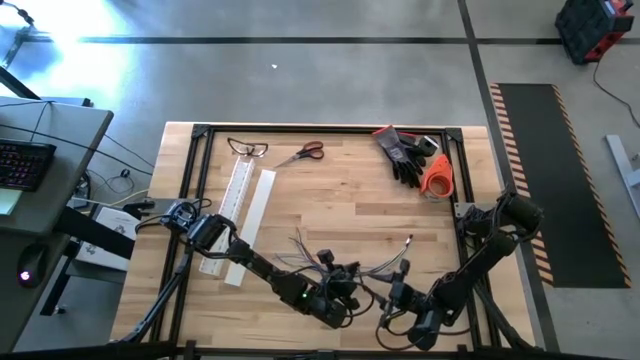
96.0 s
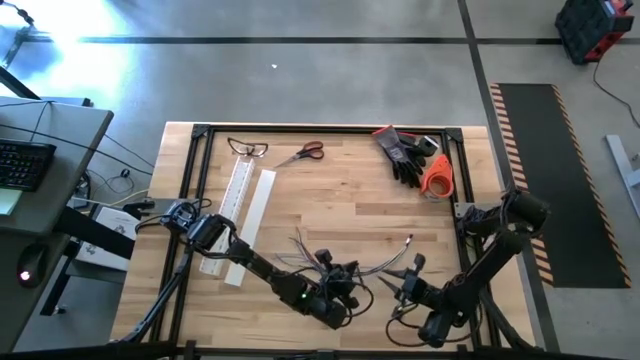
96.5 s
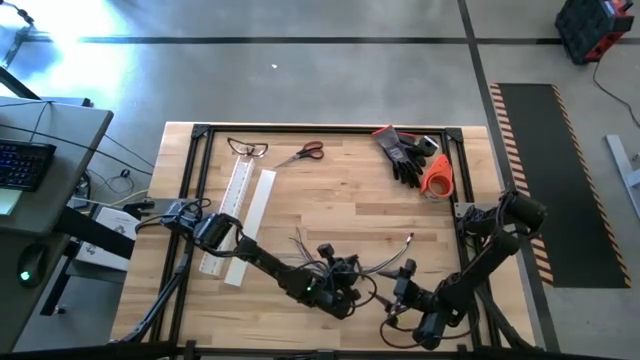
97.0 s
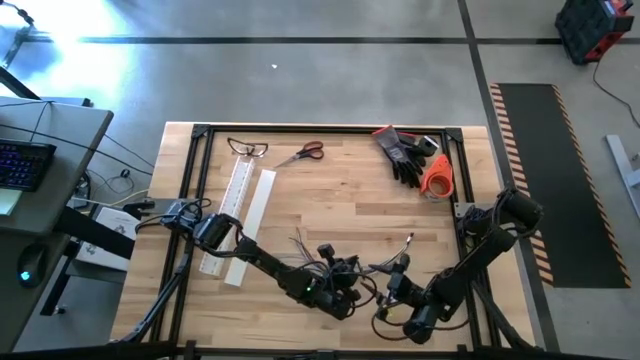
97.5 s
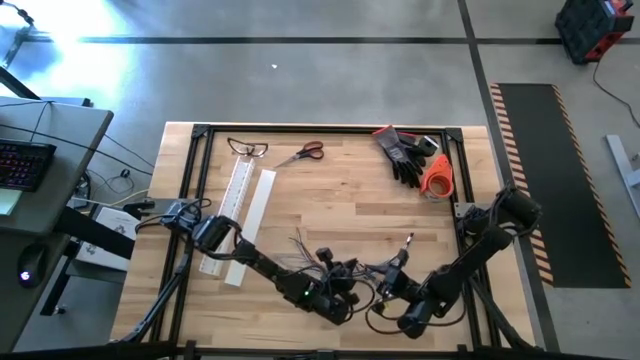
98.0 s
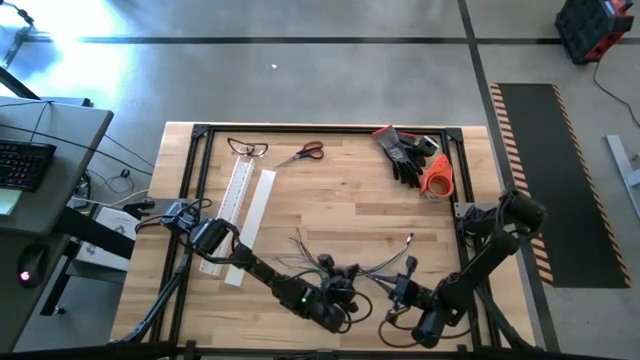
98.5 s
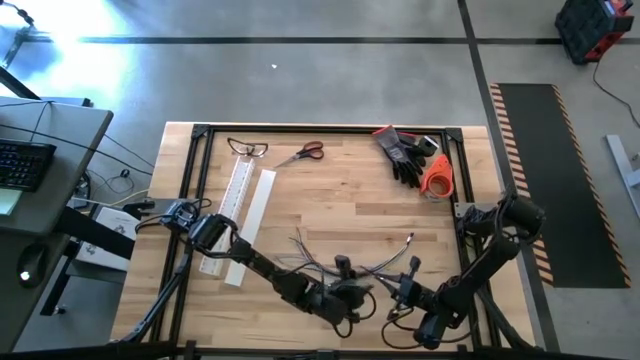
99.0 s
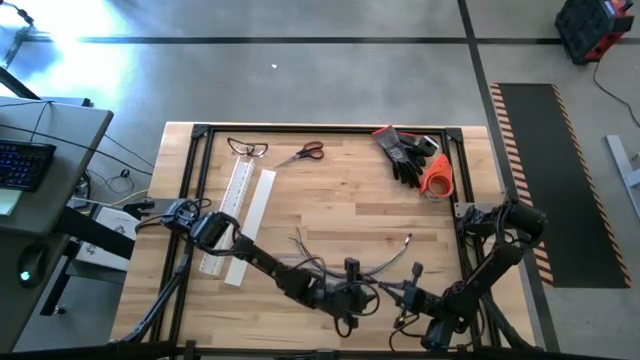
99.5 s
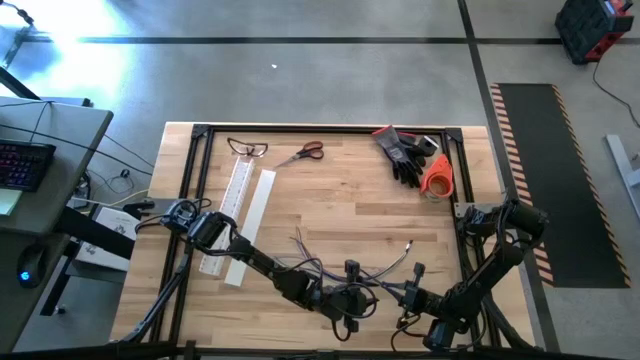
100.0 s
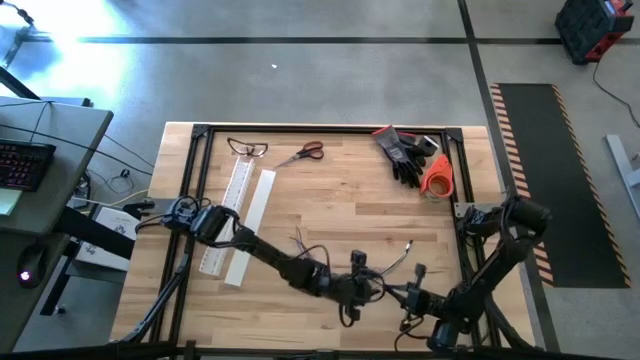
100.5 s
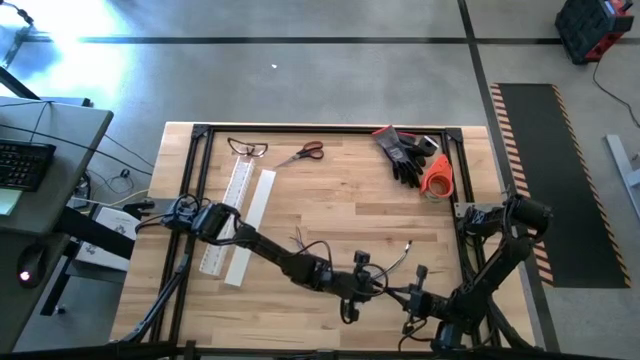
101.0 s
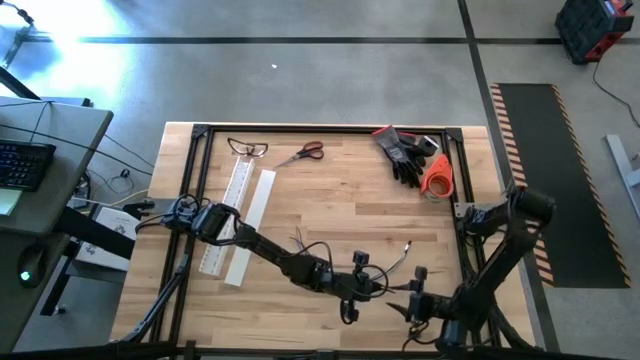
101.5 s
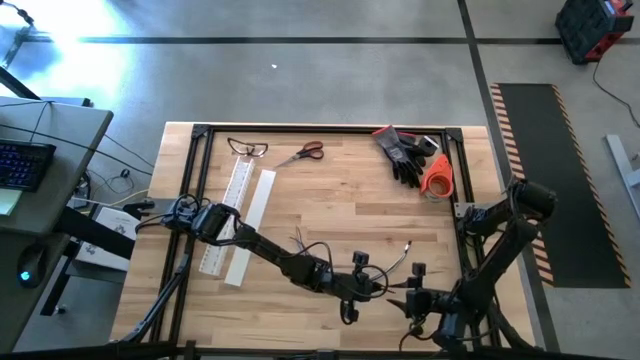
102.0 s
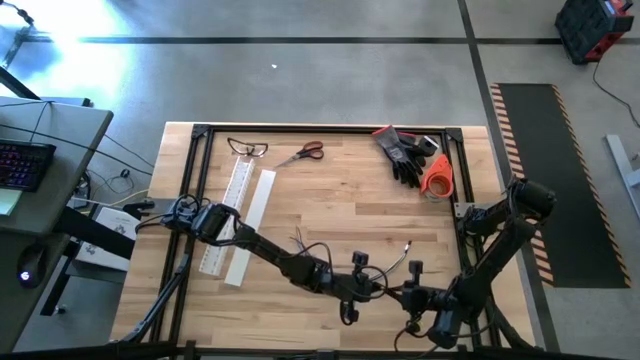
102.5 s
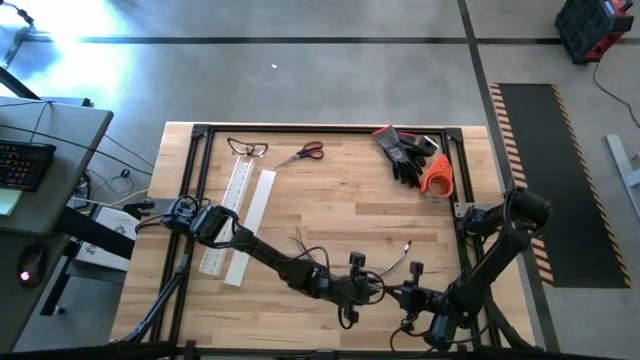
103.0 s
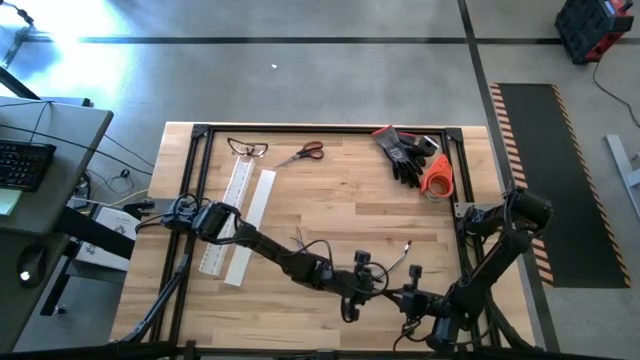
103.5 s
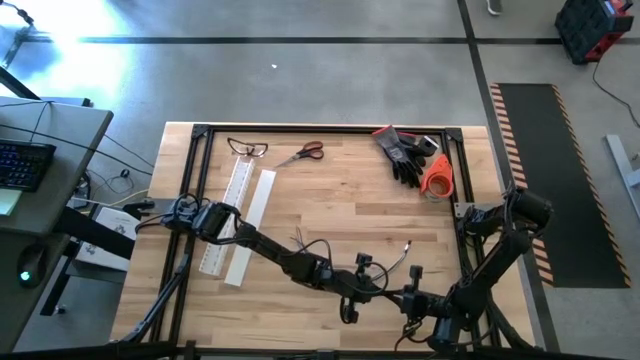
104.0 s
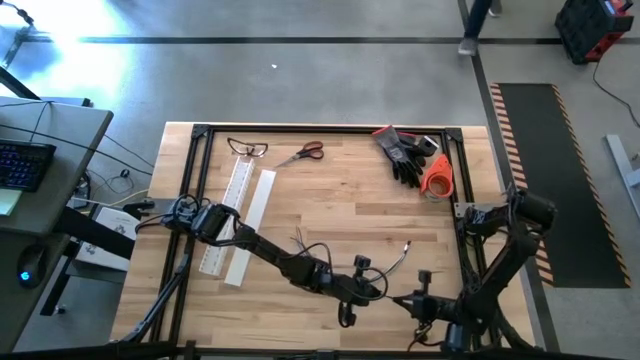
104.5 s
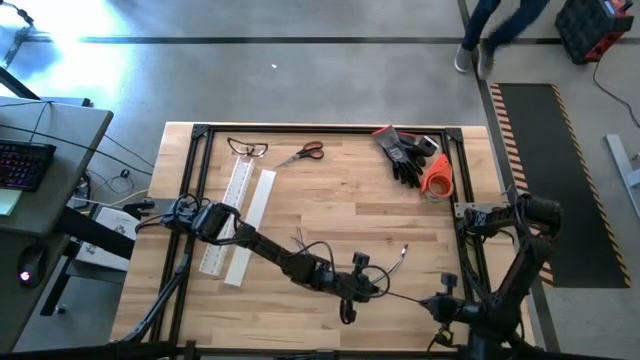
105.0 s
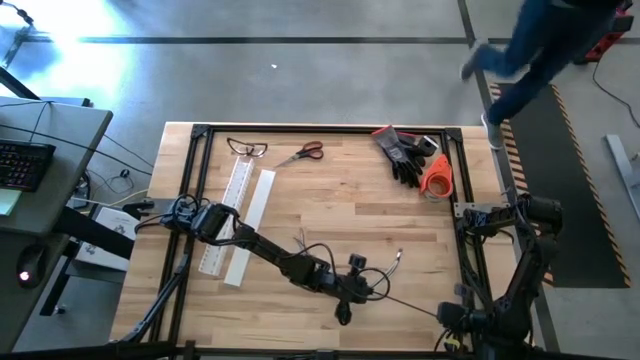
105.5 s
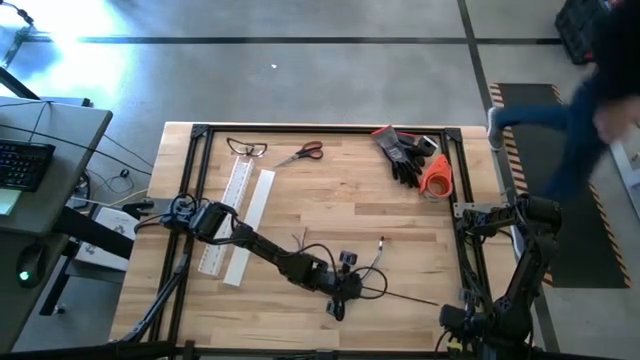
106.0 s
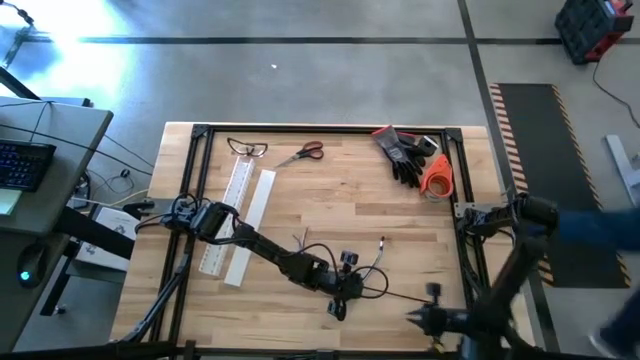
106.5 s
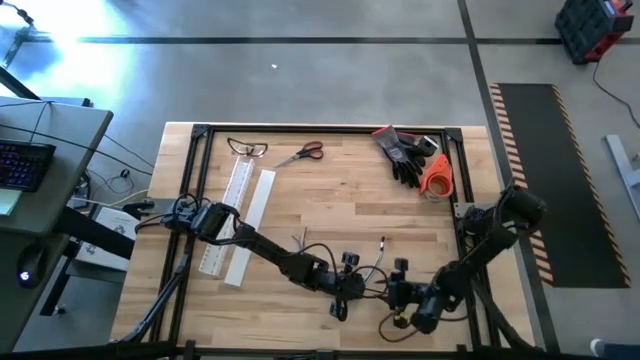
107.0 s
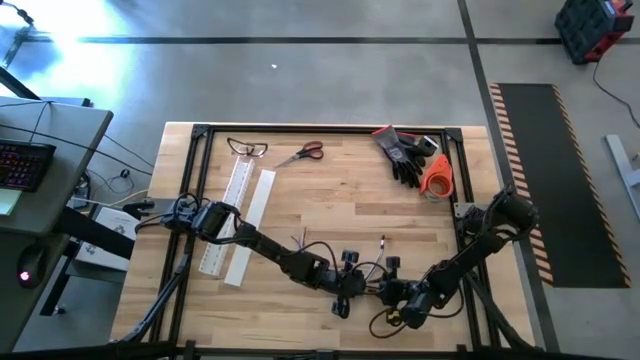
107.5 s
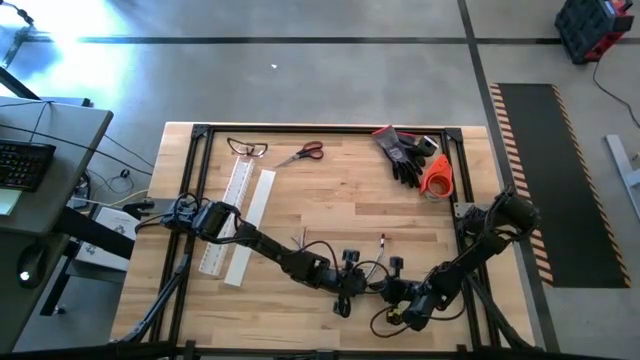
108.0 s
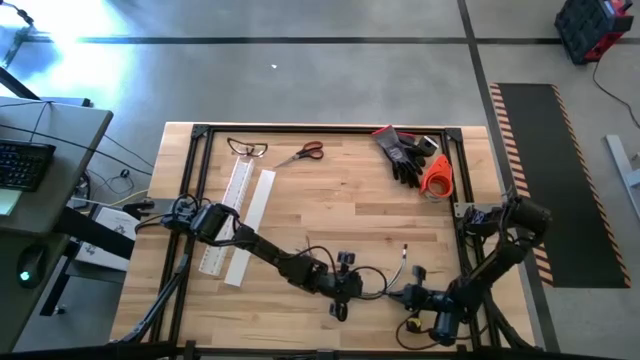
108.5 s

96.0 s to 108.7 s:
Task: Ziptie cables
Wrap the black zip tie around the cable

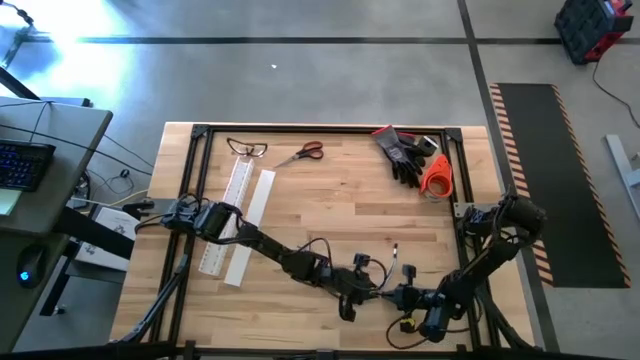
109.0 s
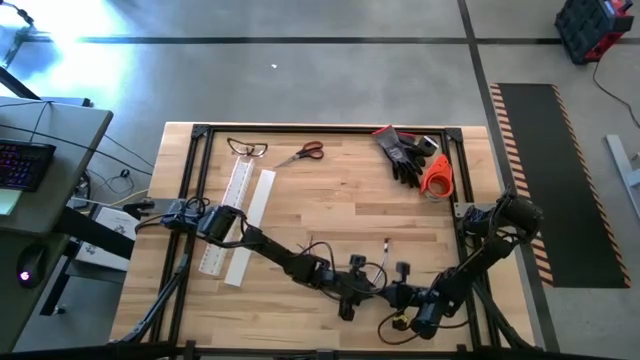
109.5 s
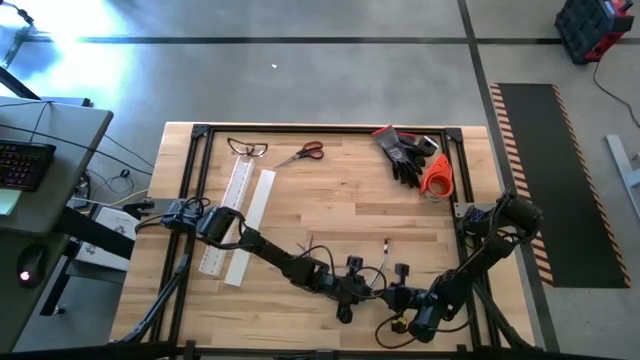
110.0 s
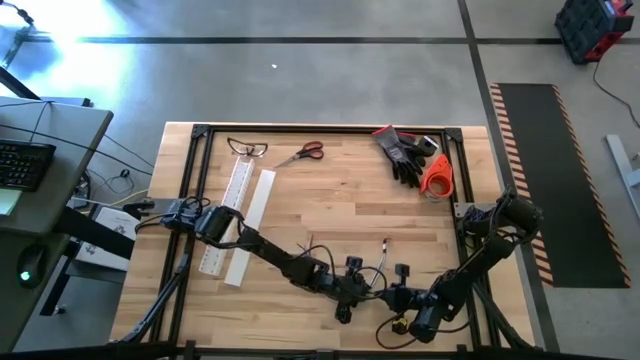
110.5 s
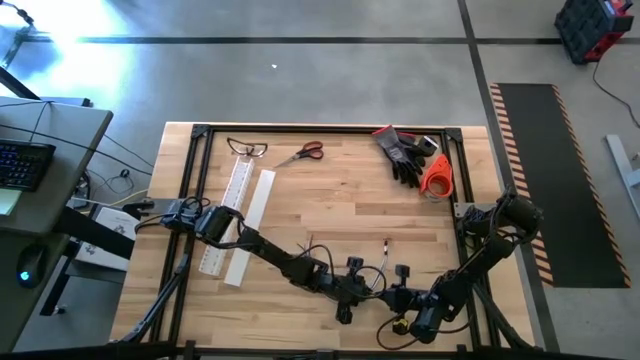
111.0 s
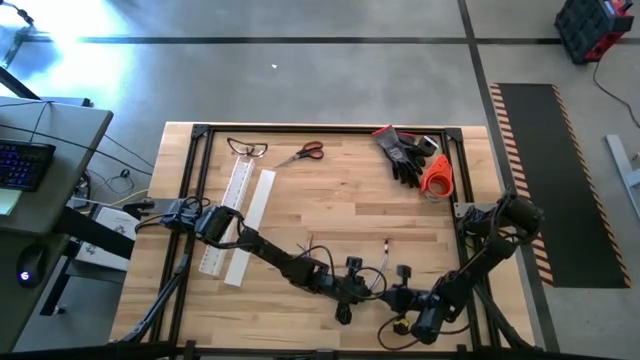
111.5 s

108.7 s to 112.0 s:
Wrap the black zip tie around the cable

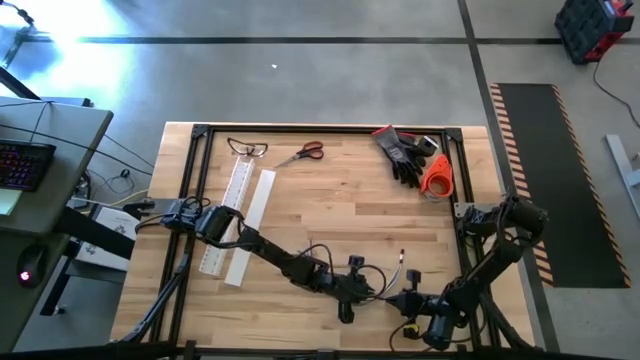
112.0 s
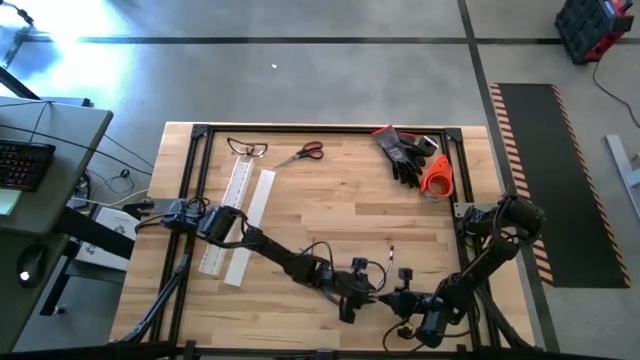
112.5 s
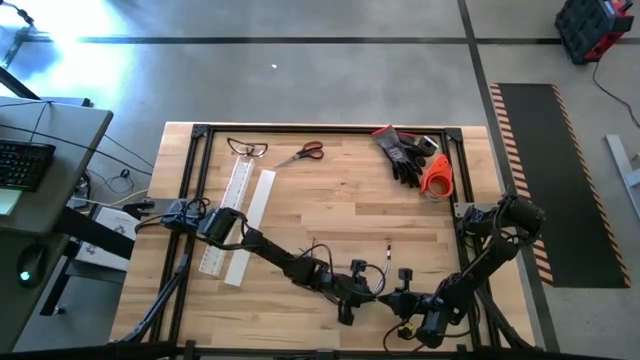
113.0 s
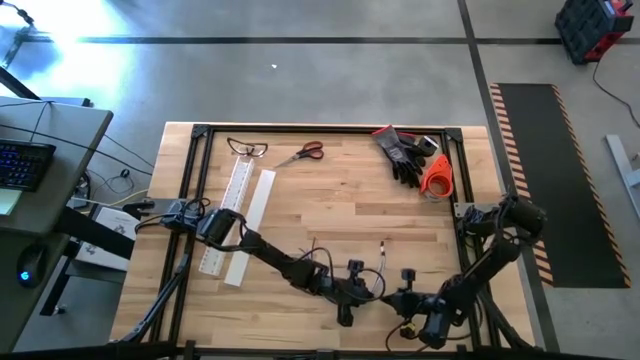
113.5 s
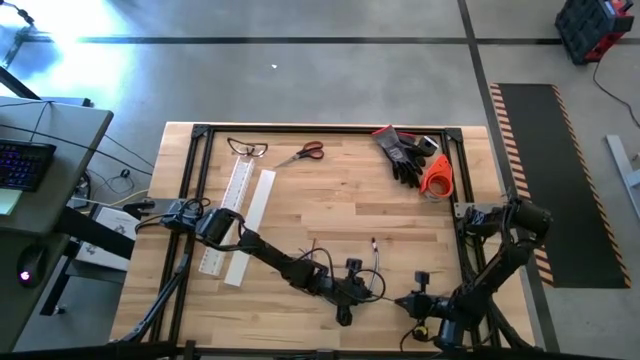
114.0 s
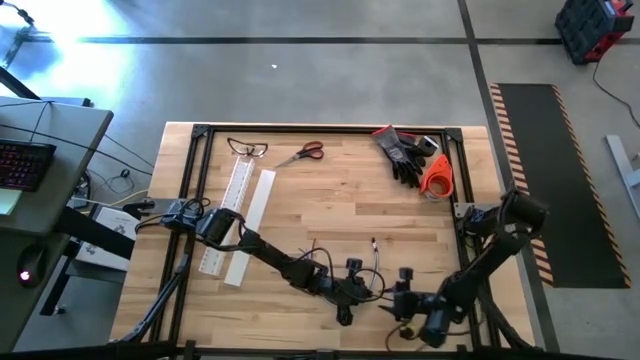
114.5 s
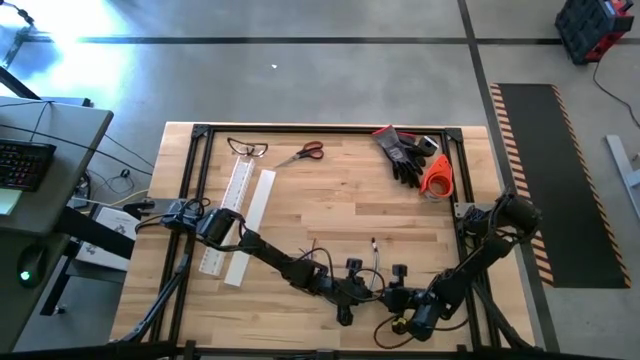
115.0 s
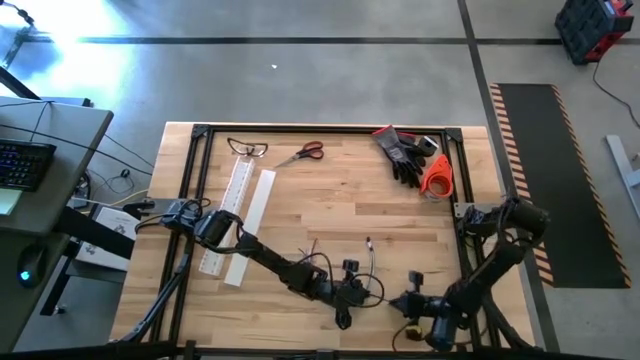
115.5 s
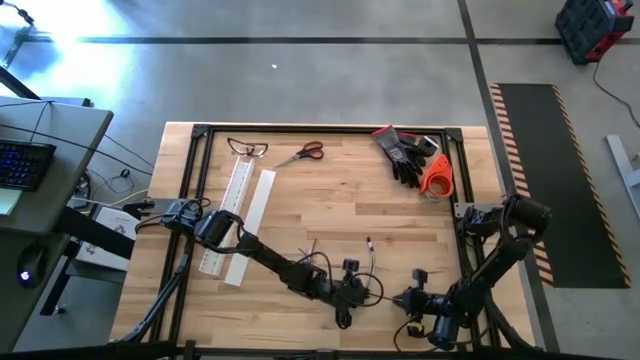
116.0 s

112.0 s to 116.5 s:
Wrap the black zip tie around the cable

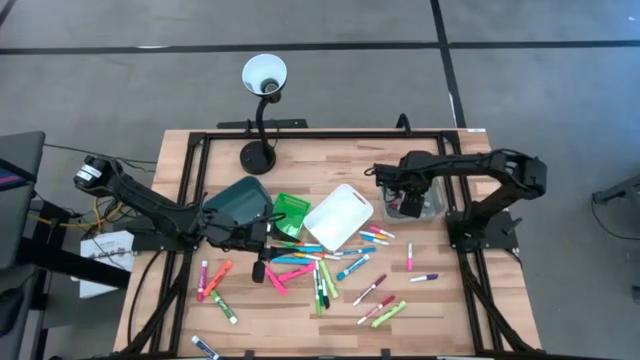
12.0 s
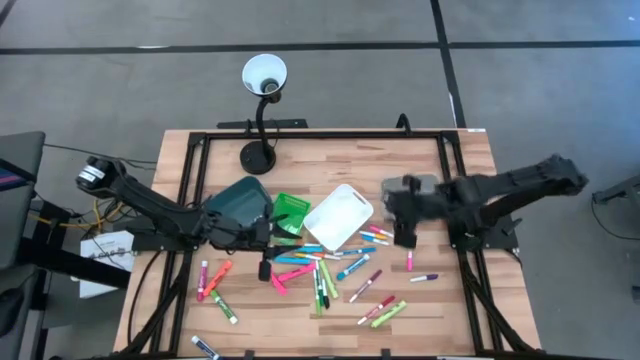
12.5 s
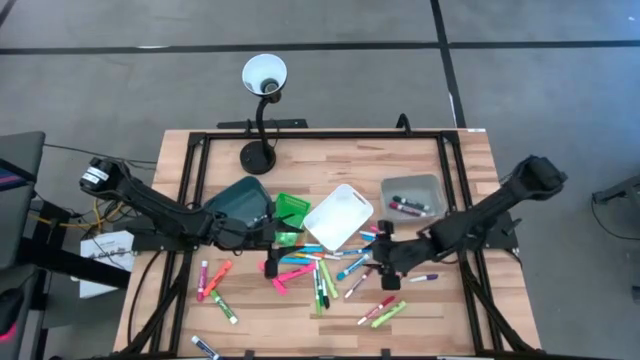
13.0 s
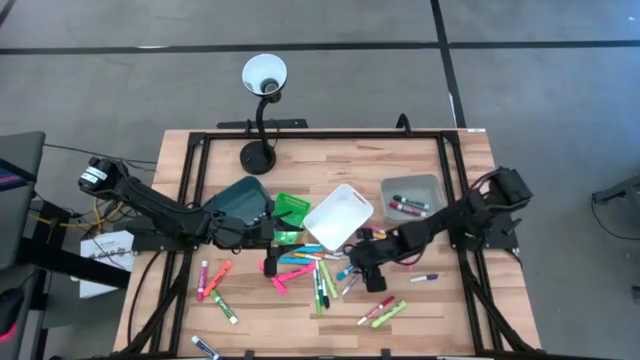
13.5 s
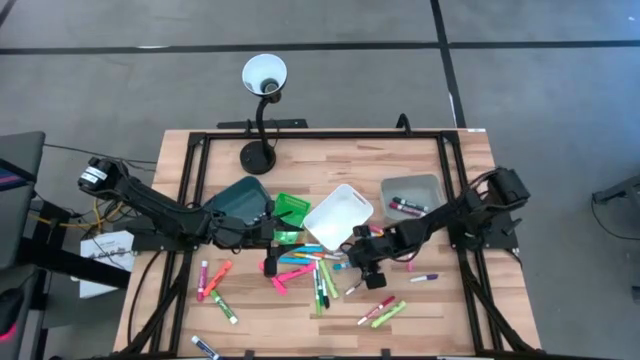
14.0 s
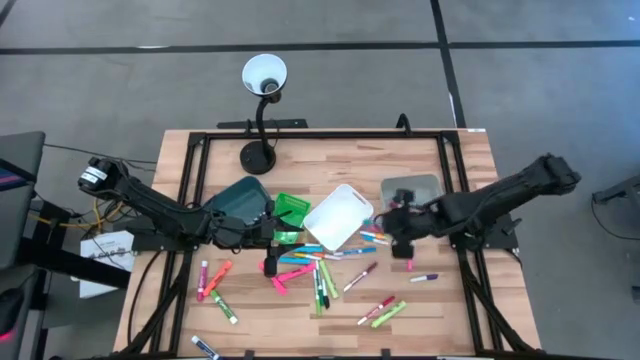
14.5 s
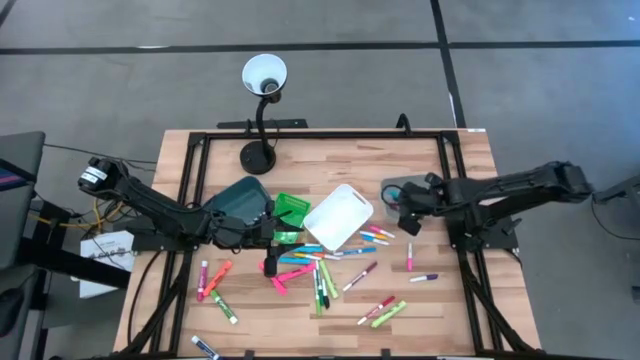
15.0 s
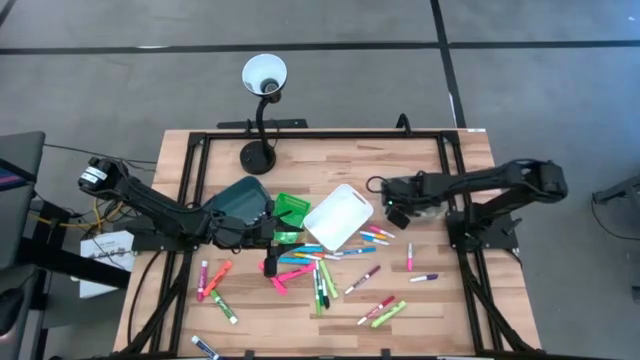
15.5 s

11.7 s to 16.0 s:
Task: Pick & Place Markers
Put the light blue marker pen into the gray bin
